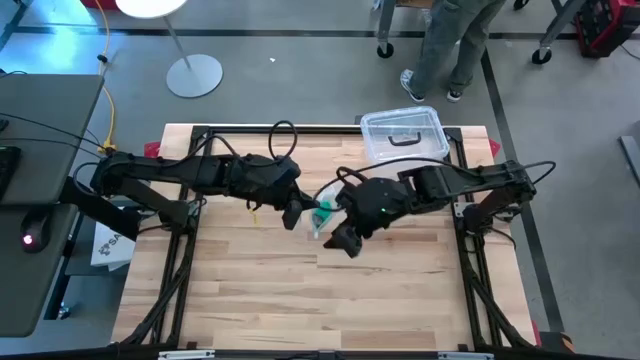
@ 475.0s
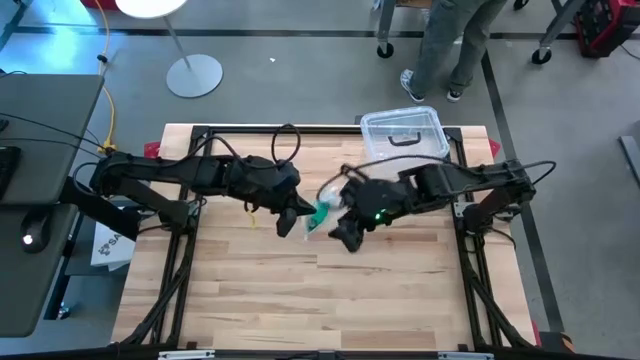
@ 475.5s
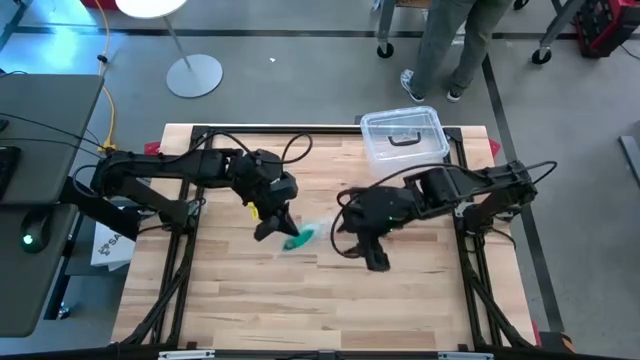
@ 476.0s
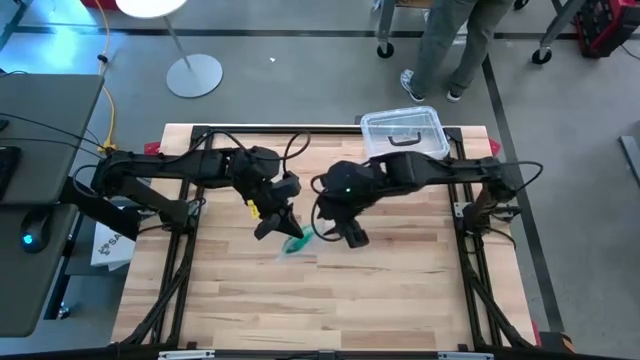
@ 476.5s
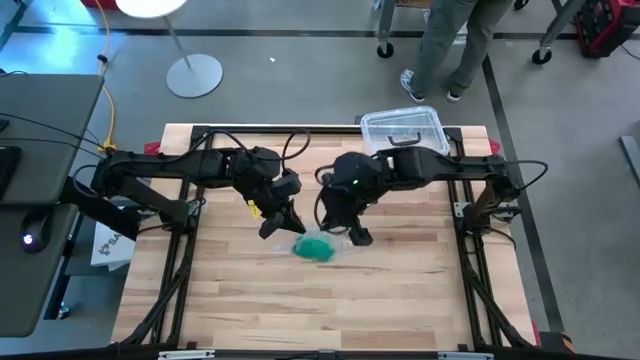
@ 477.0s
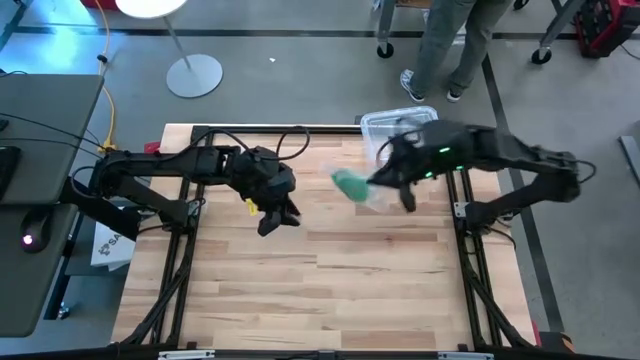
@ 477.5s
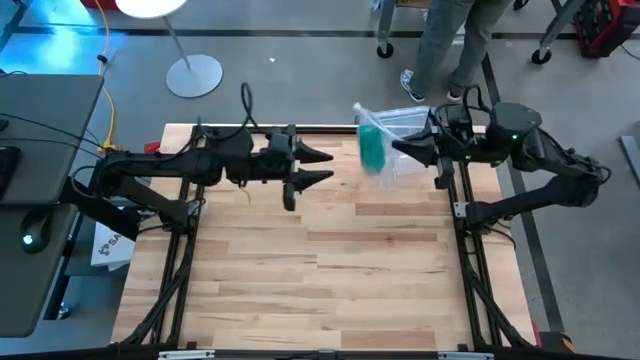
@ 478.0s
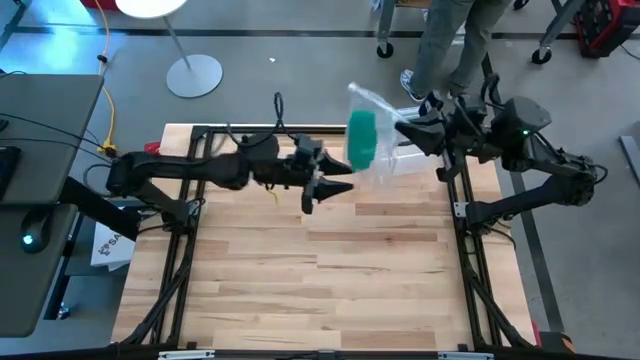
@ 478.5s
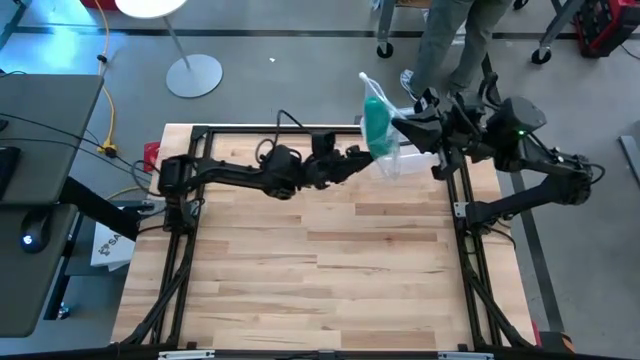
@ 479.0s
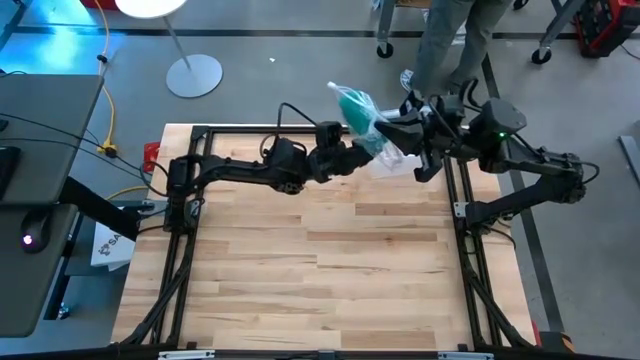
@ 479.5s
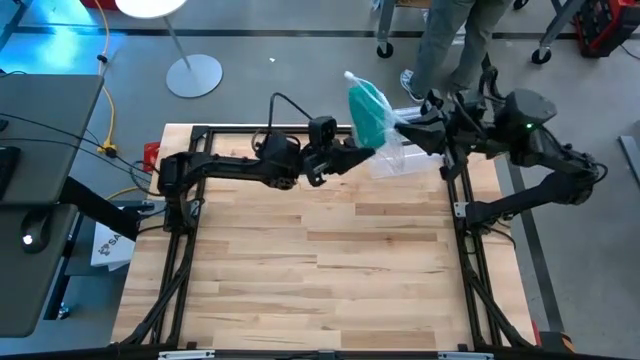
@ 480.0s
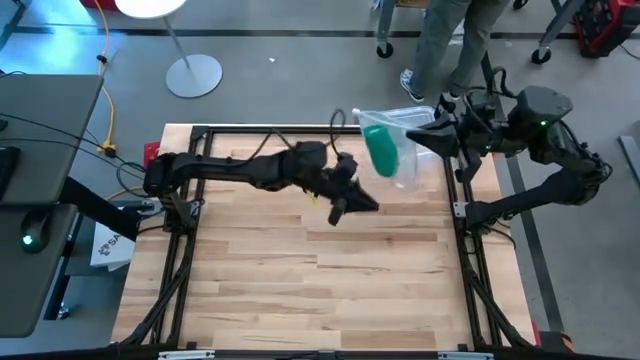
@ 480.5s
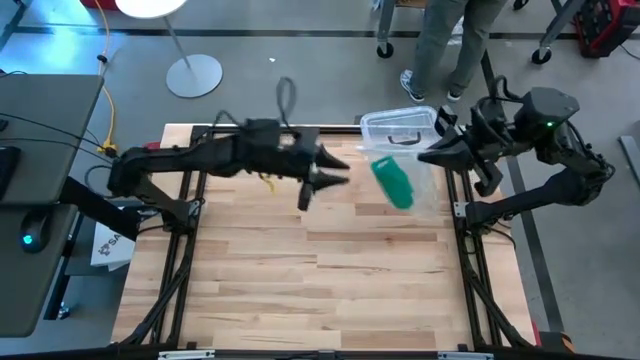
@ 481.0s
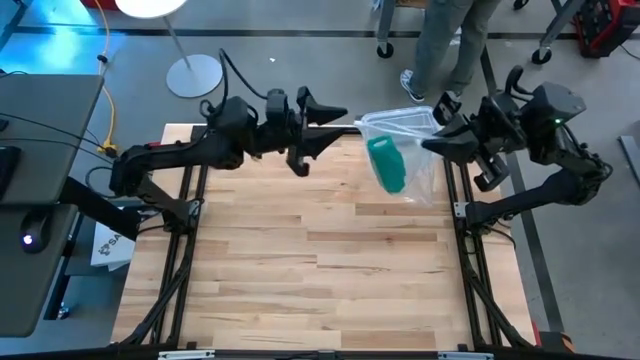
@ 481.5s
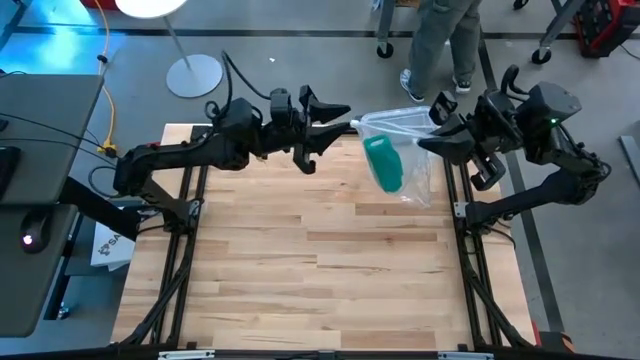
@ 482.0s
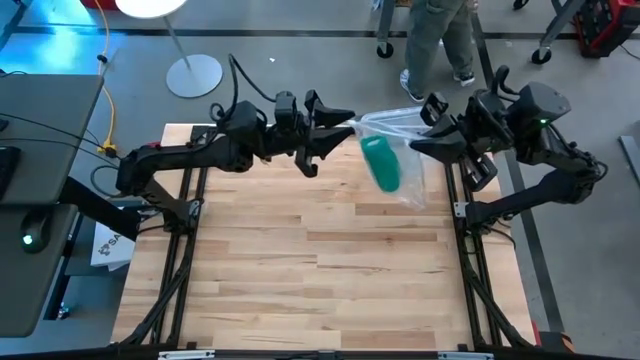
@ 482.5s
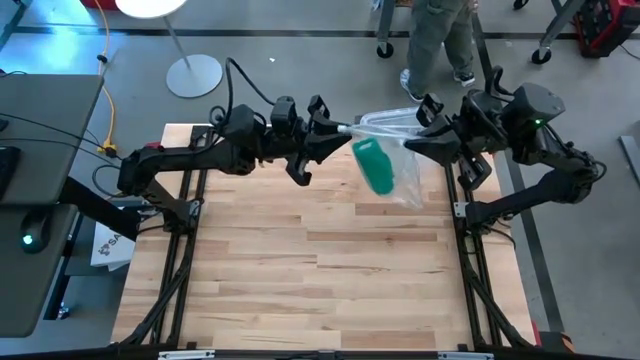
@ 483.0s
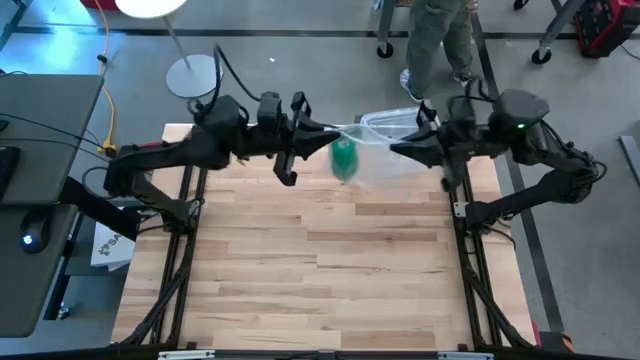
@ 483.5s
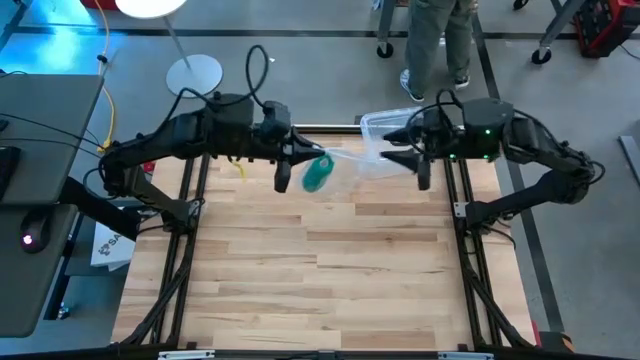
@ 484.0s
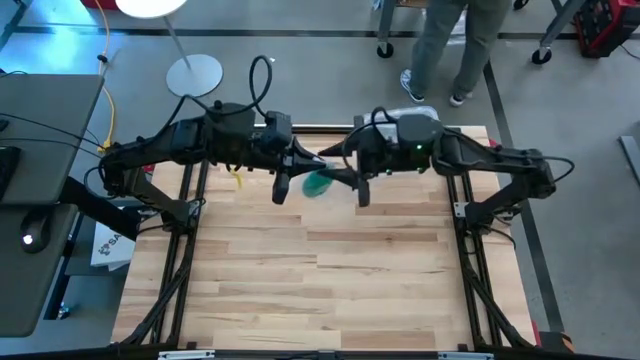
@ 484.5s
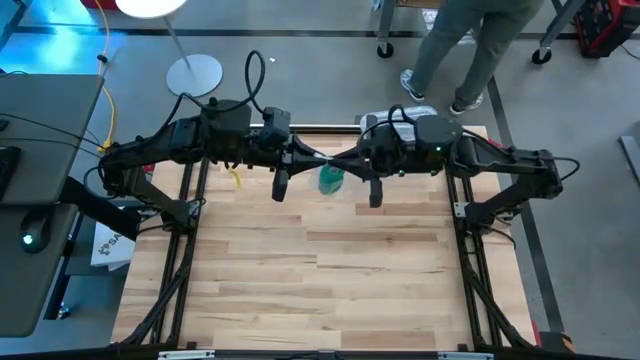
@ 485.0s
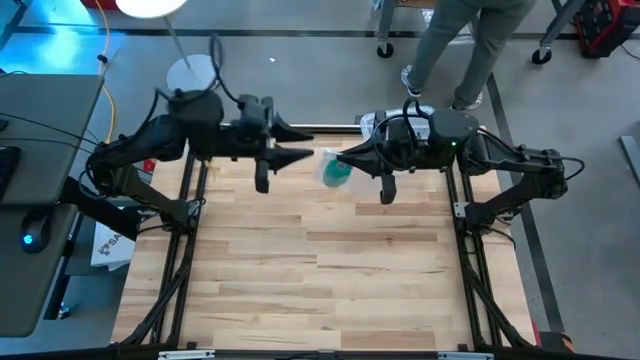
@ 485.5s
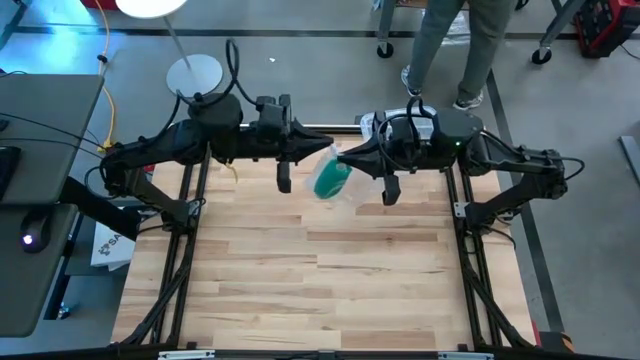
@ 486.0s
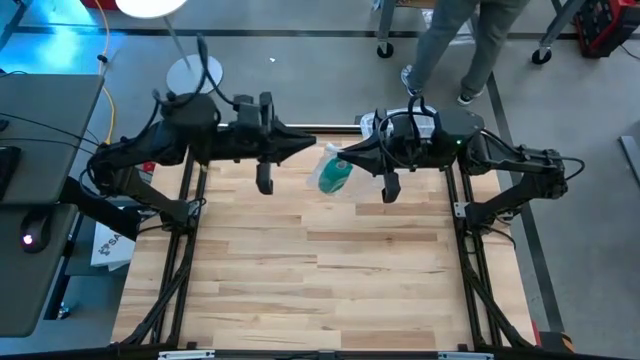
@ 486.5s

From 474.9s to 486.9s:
Task: Roll bandage
Close the transparent zip bag

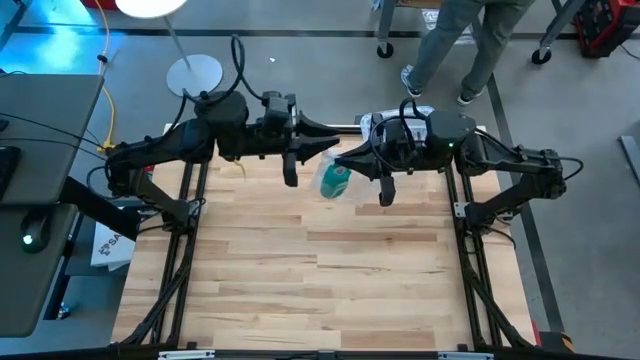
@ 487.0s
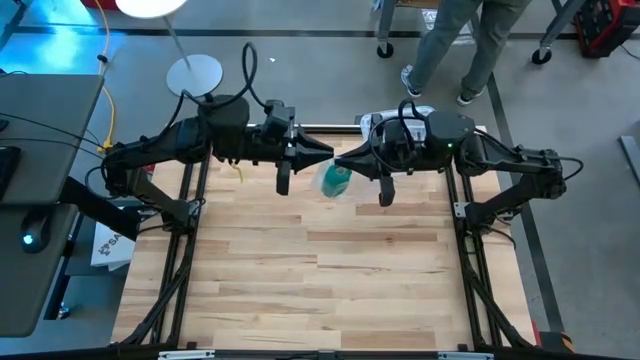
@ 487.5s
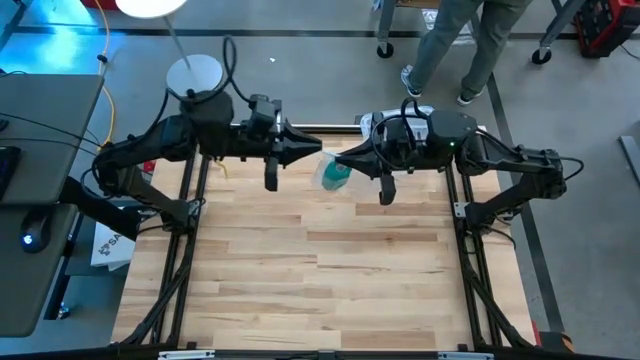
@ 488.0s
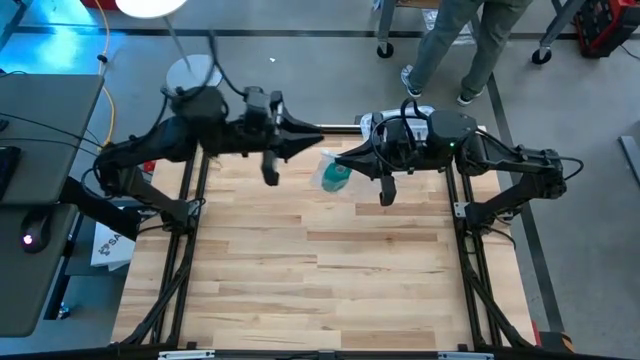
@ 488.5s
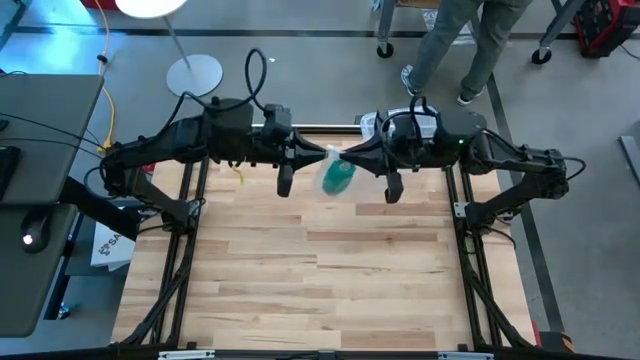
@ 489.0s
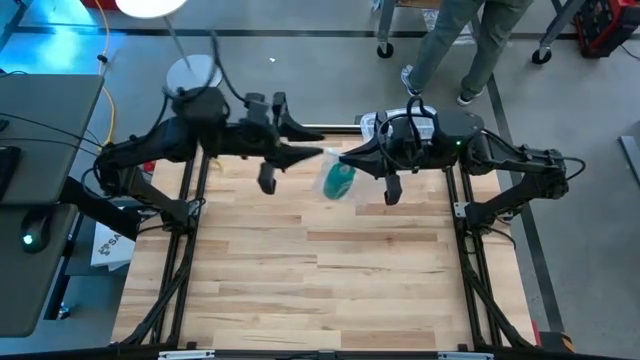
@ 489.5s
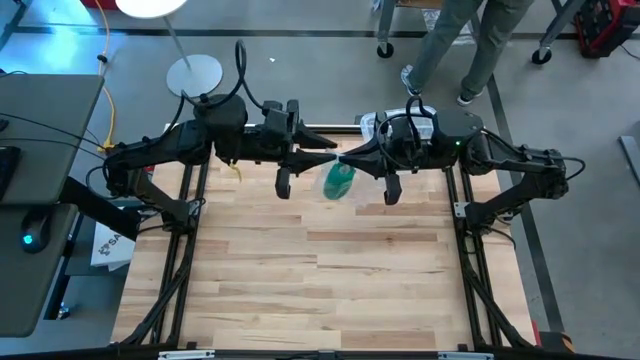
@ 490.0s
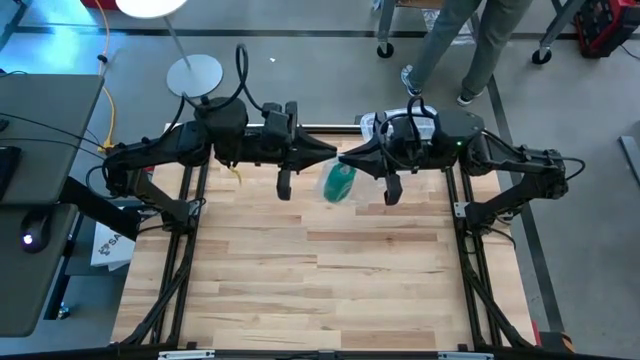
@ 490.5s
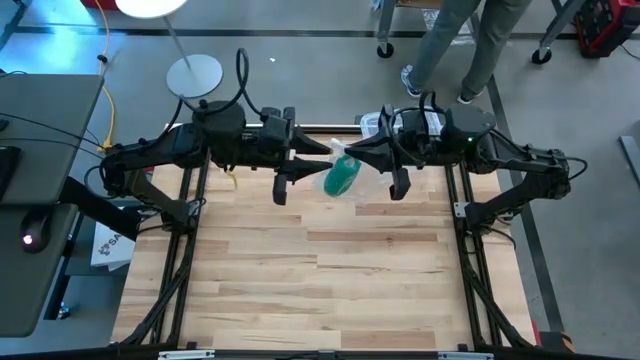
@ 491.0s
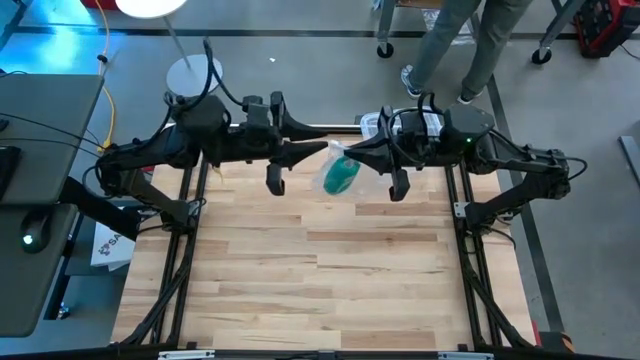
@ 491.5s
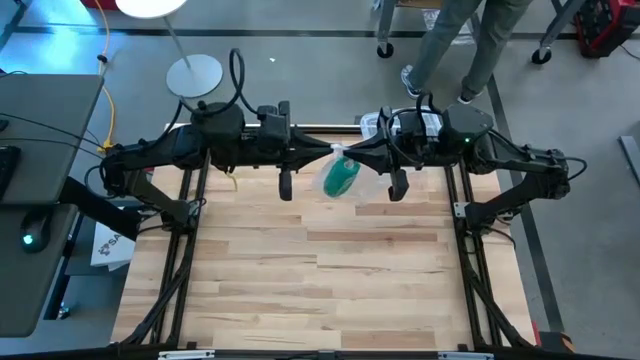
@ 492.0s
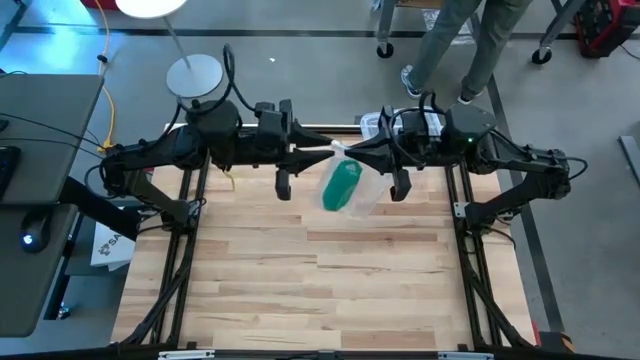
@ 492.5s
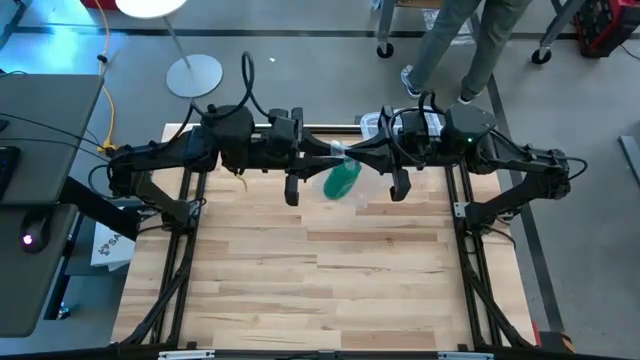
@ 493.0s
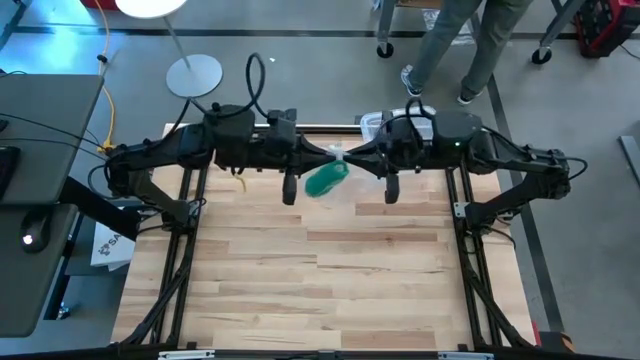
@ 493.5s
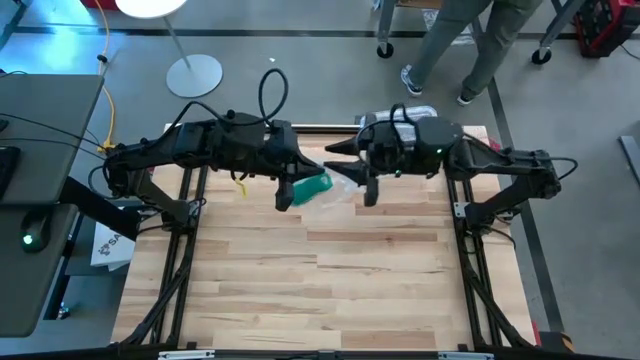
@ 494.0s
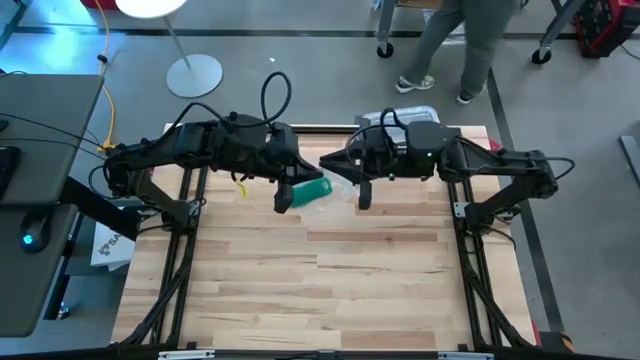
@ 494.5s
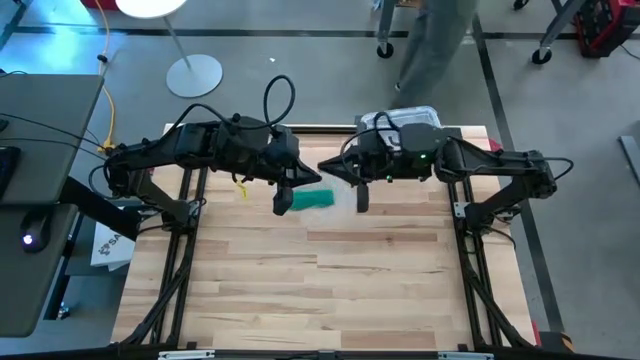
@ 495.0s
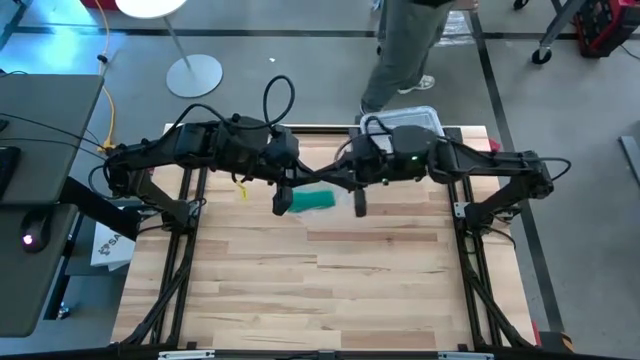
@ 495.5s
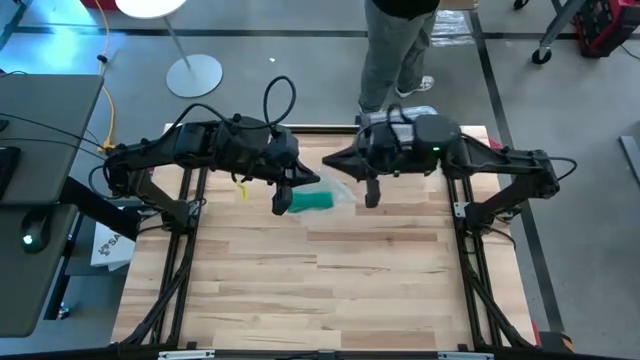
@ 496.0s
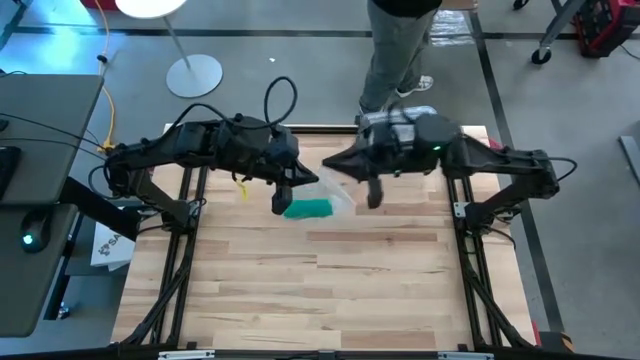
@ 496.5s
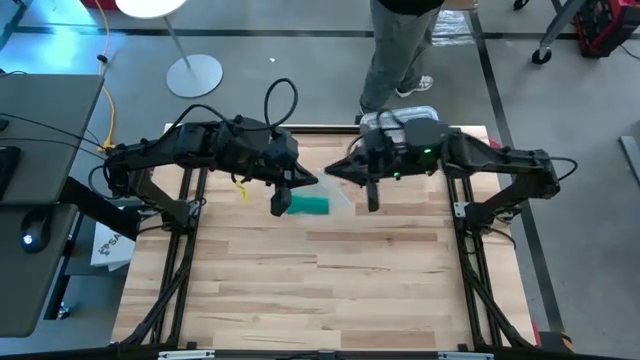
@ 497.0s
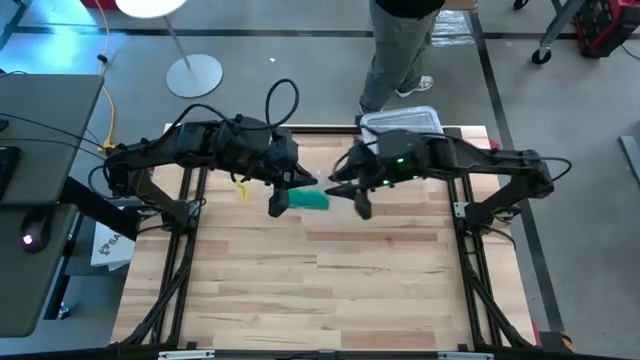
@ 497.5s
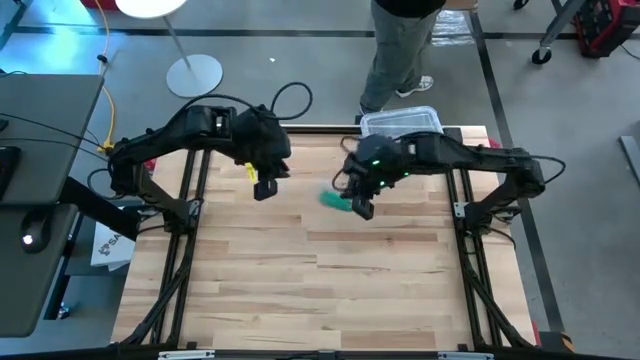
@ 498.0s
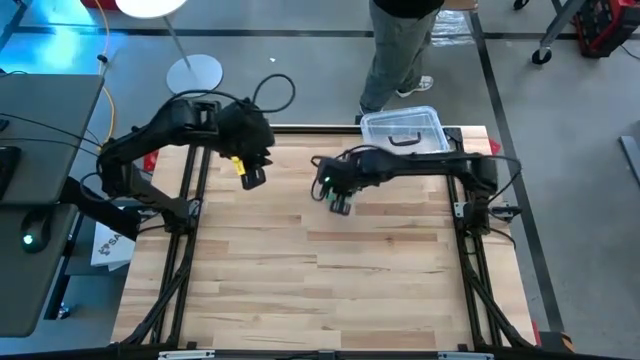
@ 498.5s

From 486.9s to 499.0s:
Close the transparent zip bag
